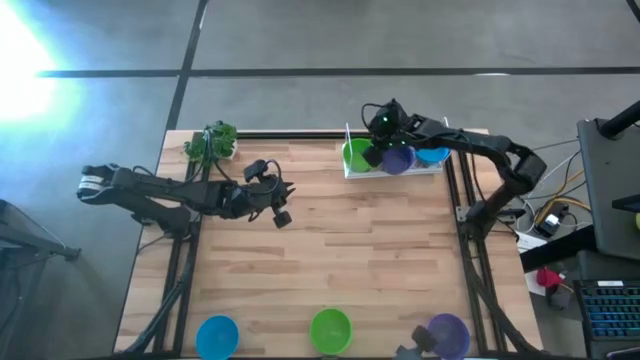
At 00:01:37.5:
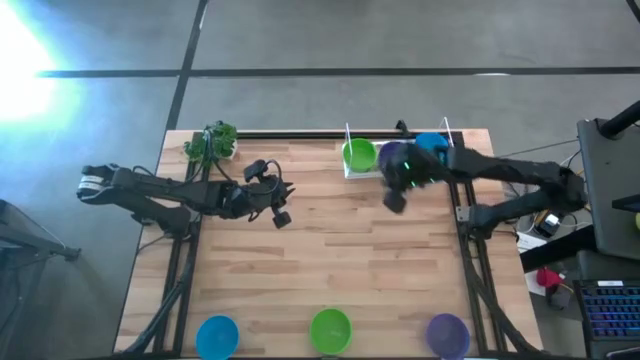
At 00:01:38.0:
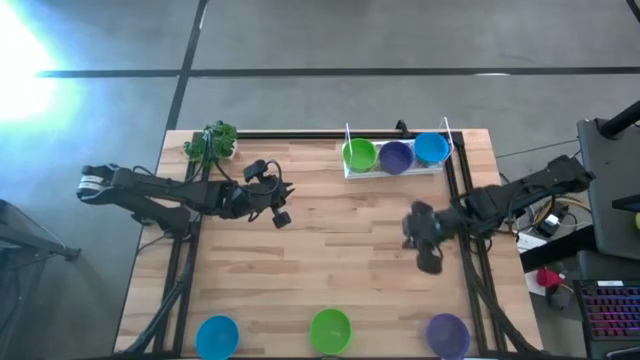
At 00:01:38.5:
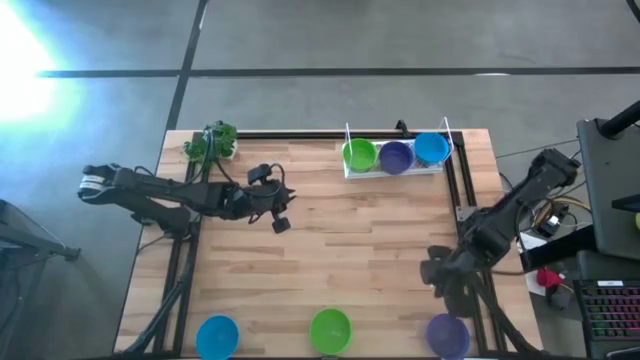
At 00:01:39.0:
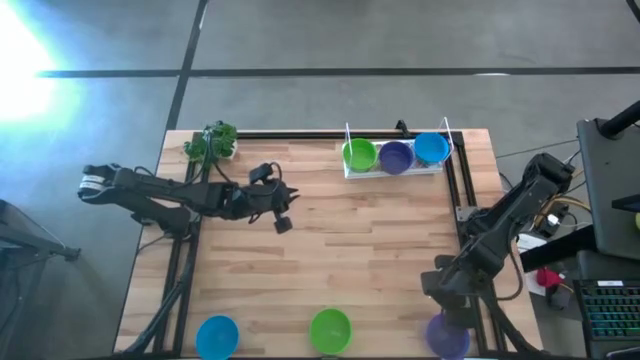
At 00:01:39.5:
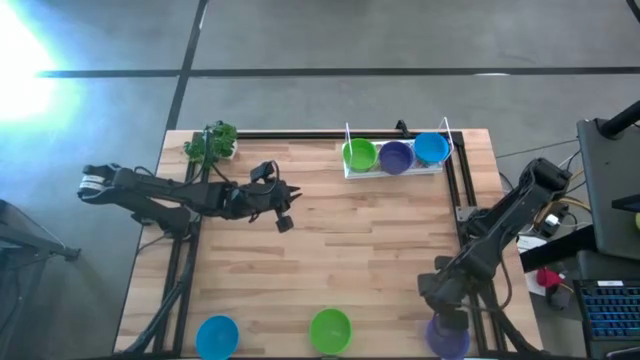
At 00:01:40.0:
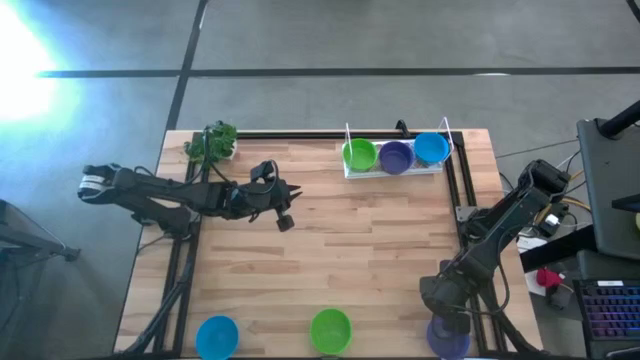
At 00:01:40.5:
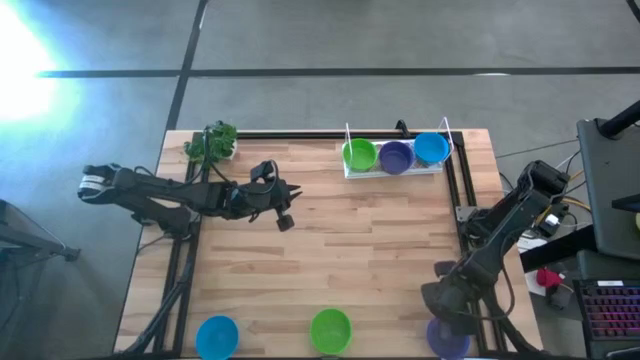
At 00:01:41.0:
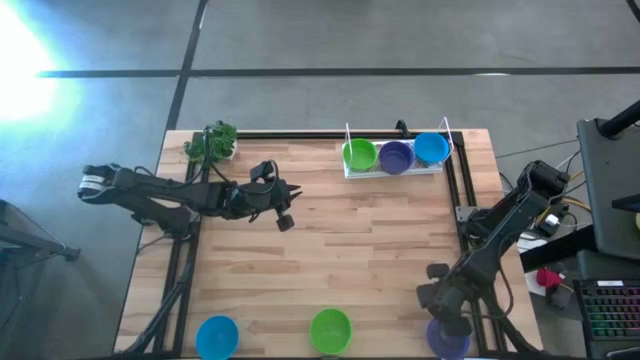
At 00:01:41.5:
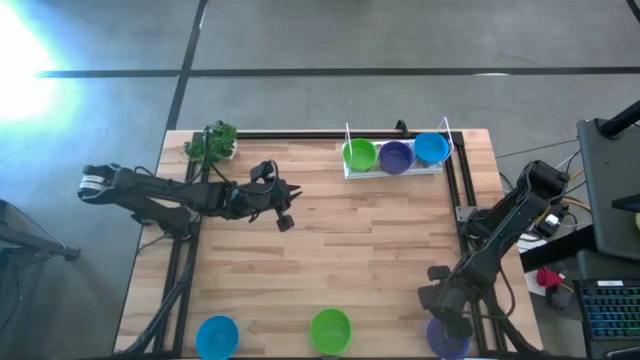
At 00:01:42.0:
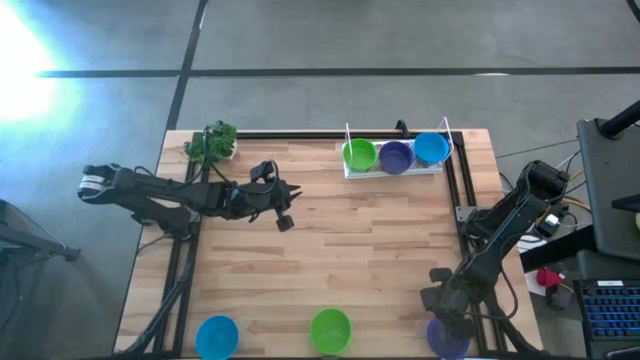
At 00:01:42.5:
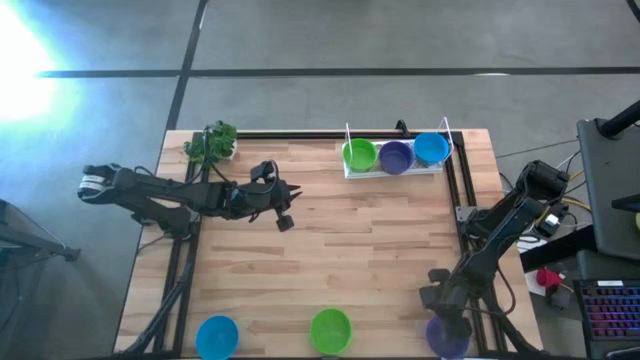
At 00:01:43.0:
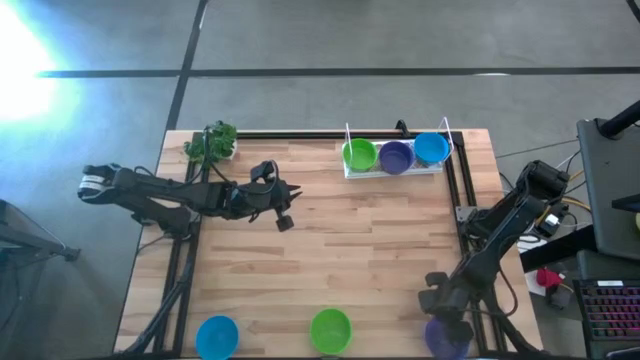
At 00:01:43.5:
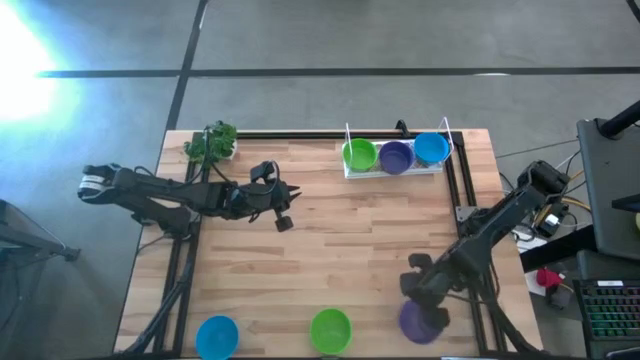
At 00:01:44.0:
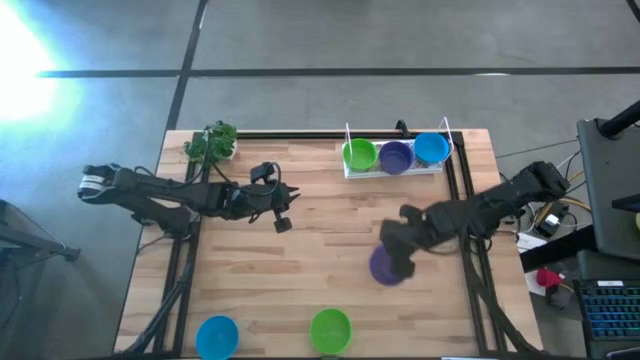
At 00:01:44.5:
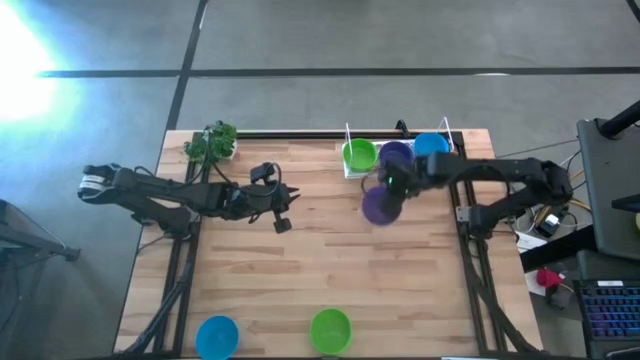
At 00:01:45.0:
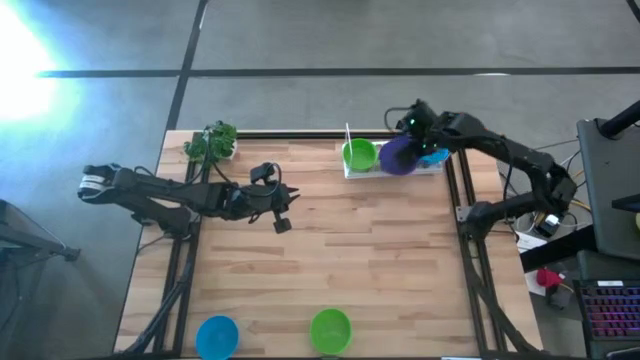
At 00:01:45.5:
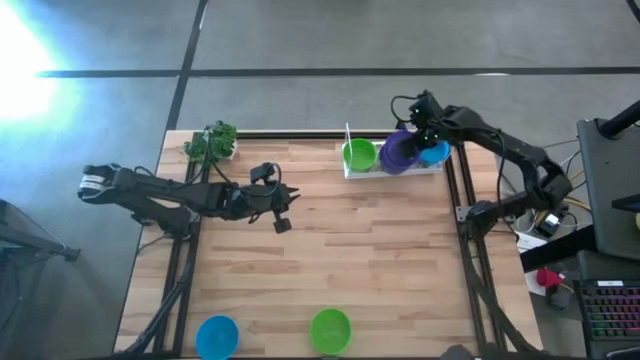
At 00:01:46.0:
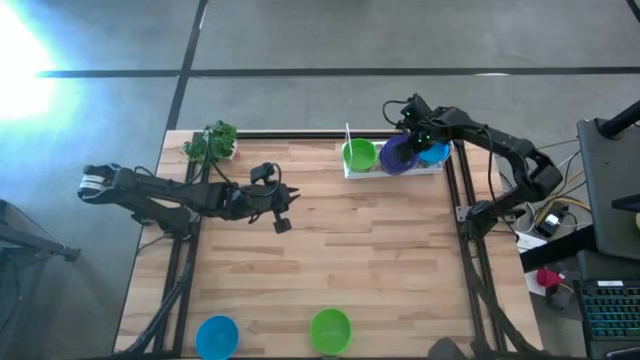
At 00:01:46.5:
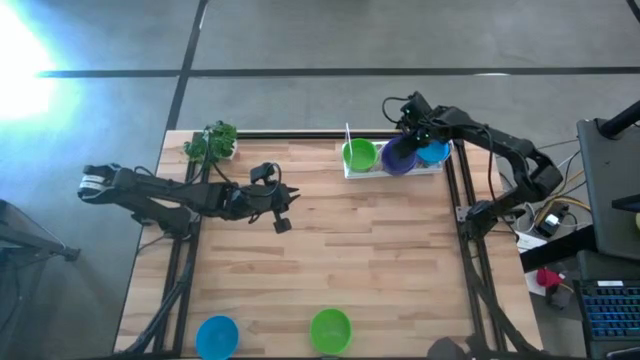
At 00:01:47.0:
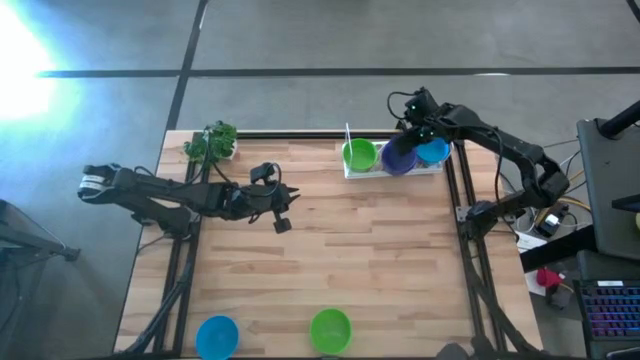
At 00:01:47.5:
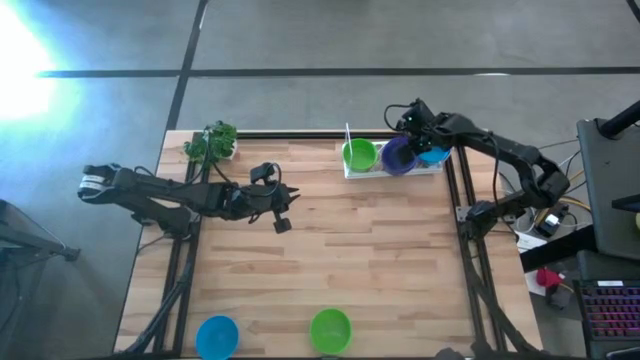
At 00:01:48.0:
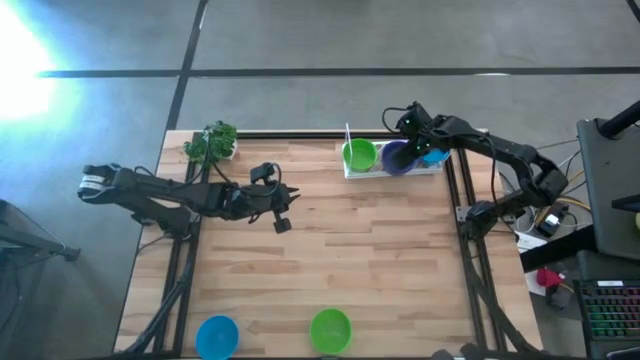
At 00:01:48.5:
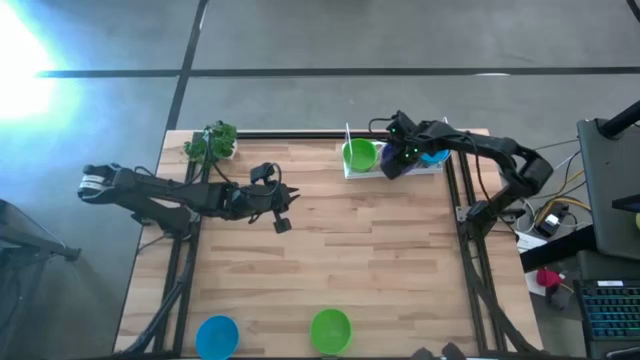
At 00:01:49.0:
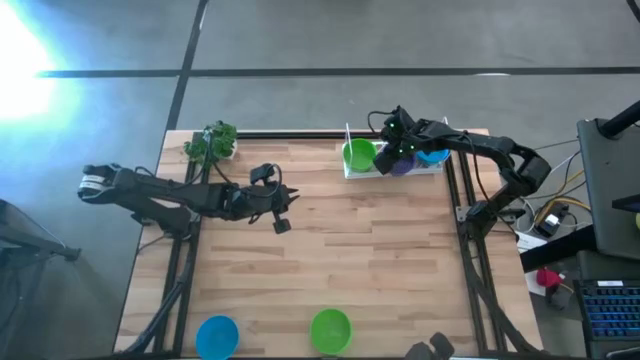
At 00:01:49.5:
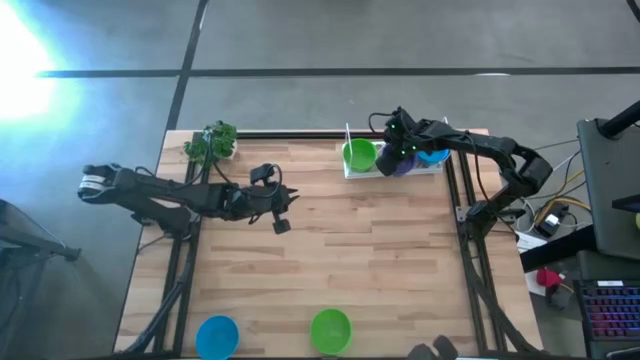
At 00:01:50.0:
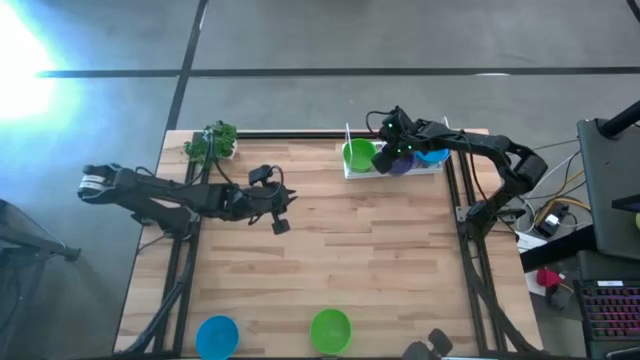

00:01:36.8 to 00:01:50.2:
Task: Pick & Place Mini bowls
Stack the violet bowl on top of the violet bowl on the shelf

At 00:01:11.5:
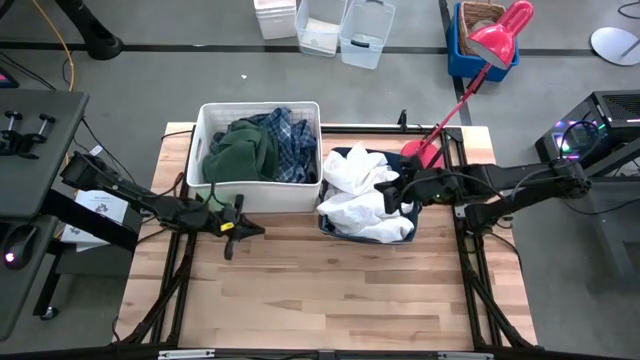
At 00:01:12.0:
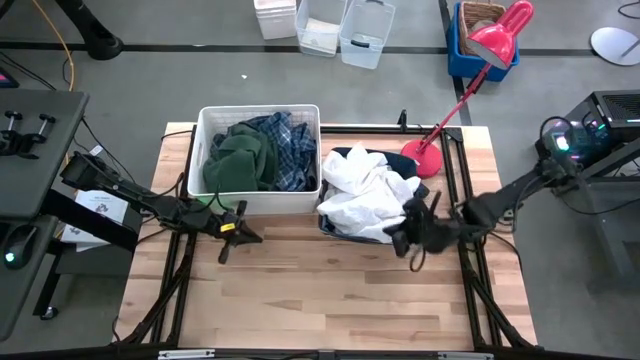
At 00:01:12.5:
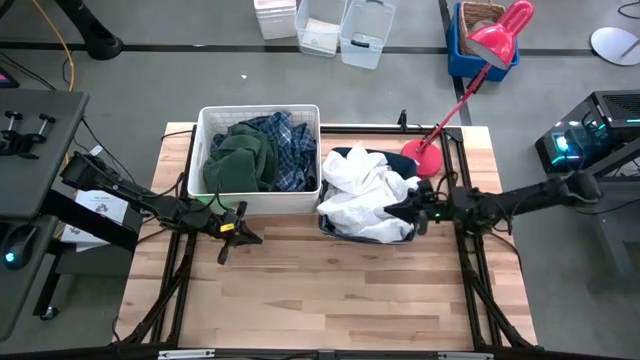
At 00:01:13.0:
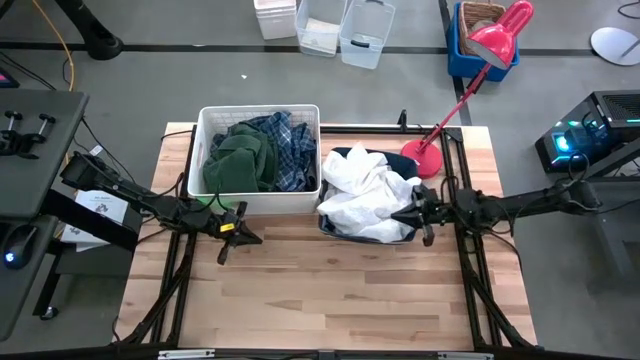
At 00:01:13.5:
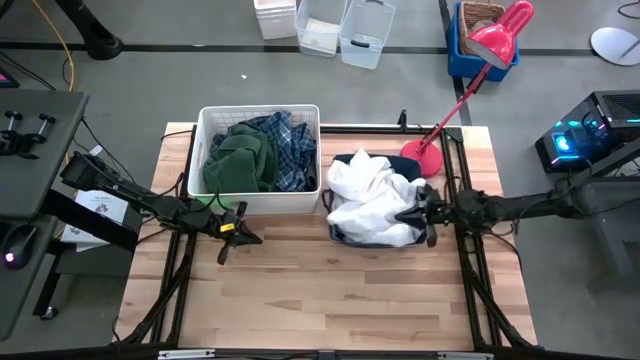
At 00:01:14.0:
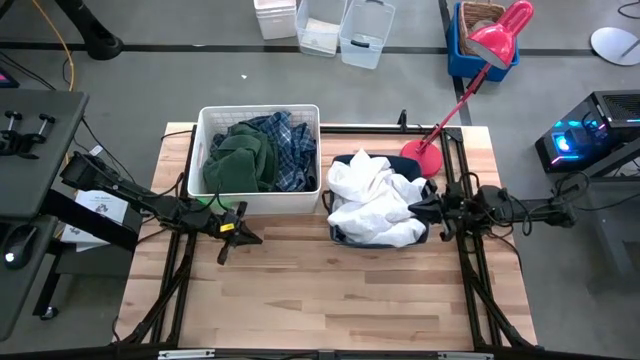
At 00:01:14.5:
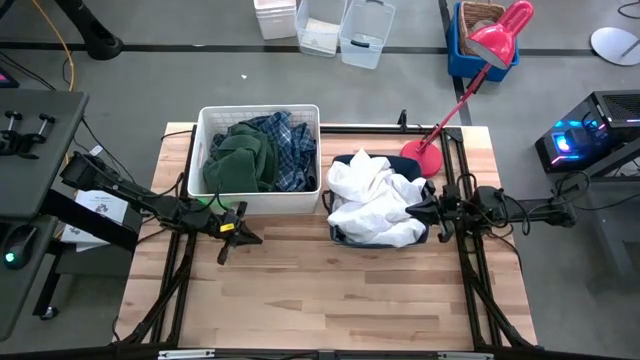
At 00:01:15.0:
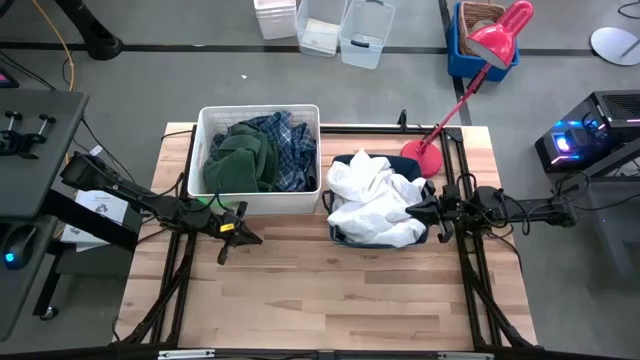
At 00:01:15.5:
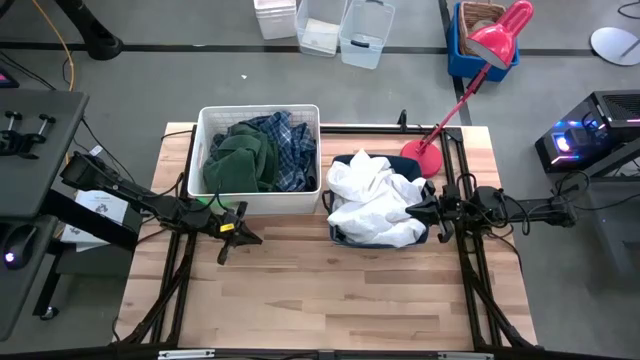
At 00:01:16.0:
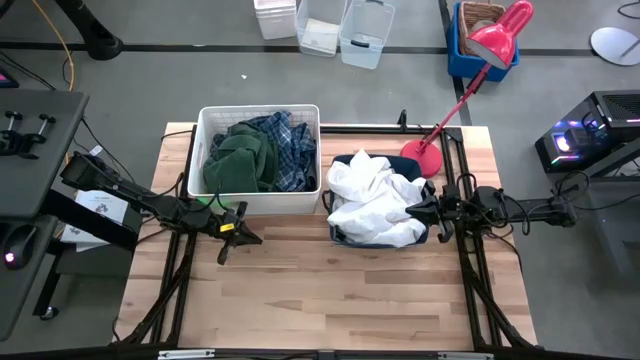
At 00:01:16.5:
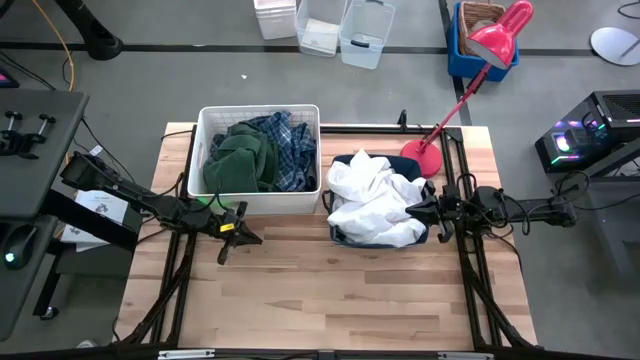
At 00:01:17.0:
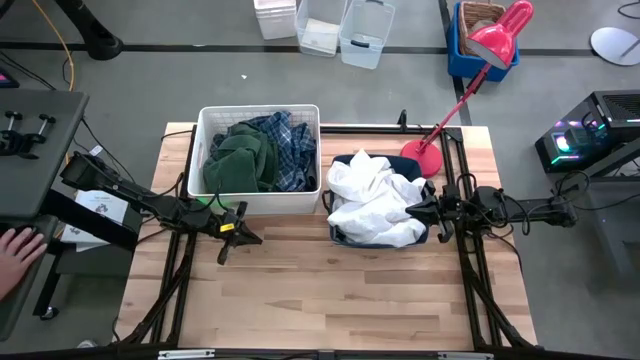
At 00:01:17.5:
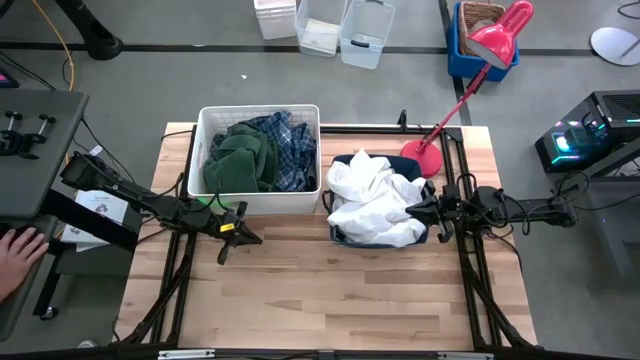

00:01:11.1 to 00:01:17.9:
Task: Sort clothes
Return to Home Position
